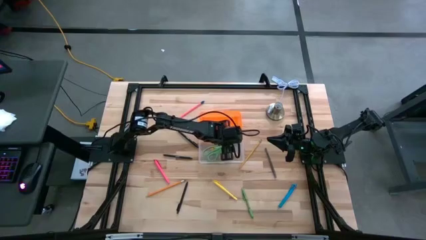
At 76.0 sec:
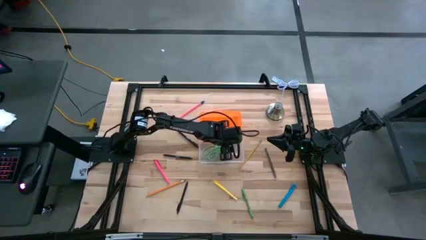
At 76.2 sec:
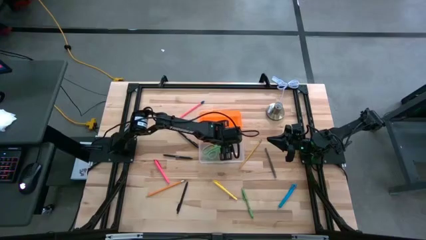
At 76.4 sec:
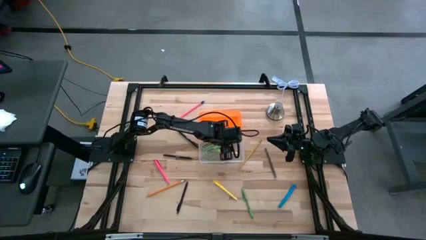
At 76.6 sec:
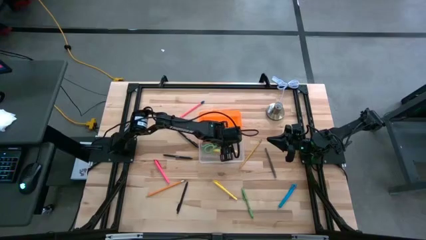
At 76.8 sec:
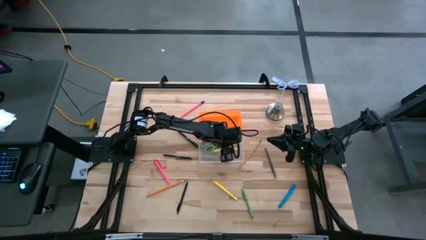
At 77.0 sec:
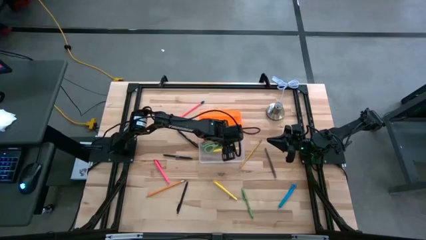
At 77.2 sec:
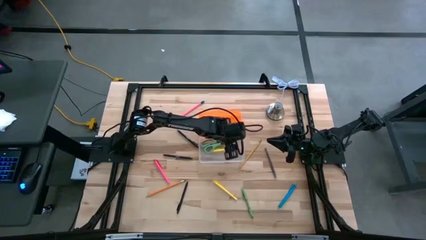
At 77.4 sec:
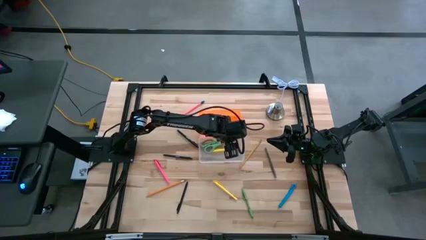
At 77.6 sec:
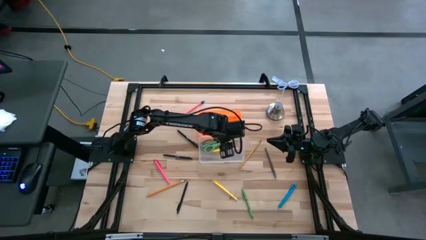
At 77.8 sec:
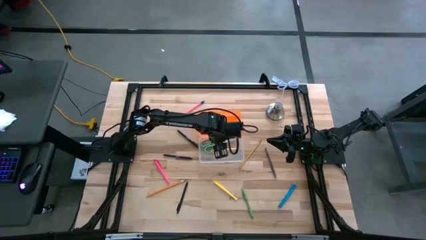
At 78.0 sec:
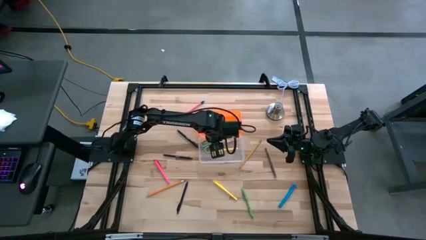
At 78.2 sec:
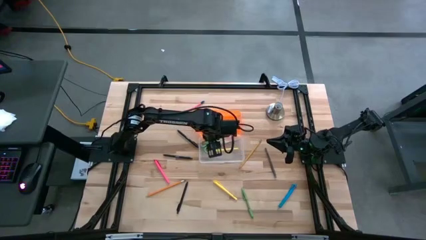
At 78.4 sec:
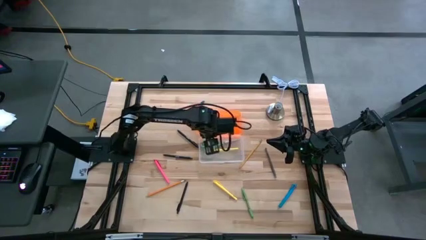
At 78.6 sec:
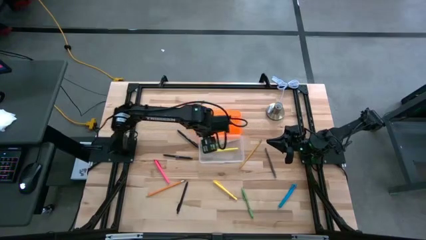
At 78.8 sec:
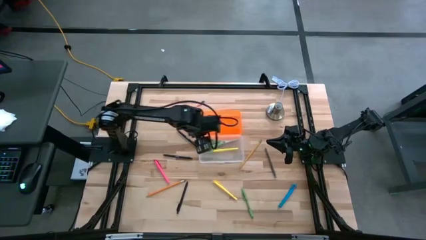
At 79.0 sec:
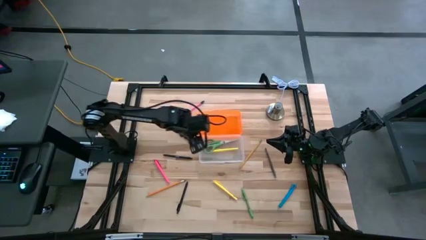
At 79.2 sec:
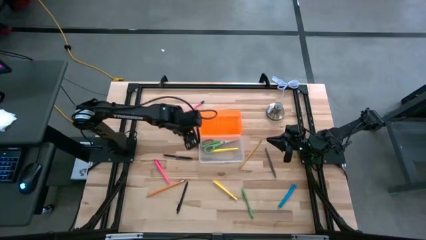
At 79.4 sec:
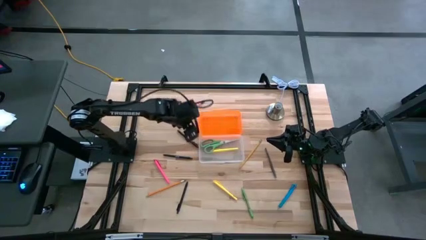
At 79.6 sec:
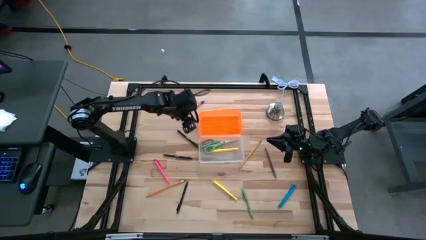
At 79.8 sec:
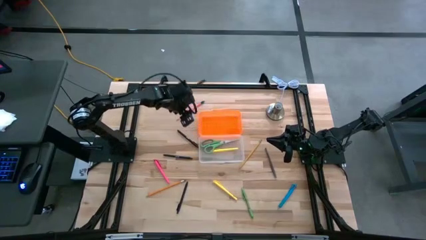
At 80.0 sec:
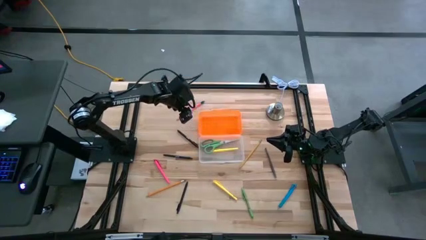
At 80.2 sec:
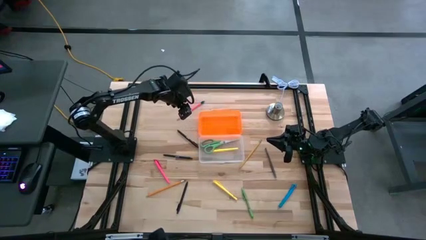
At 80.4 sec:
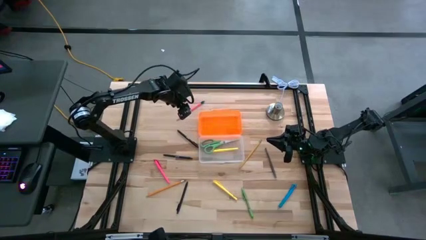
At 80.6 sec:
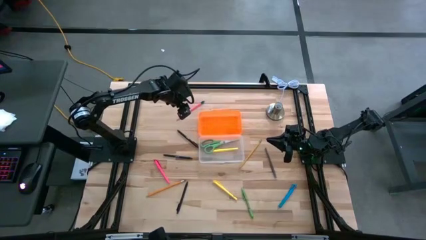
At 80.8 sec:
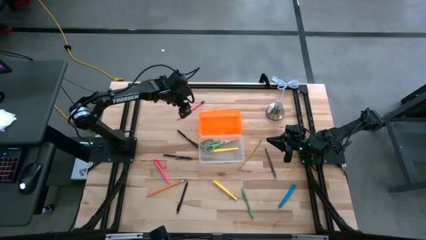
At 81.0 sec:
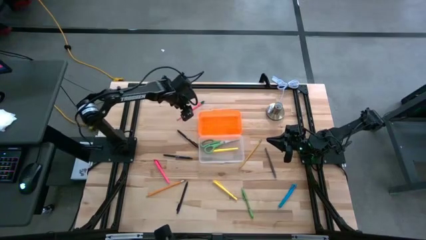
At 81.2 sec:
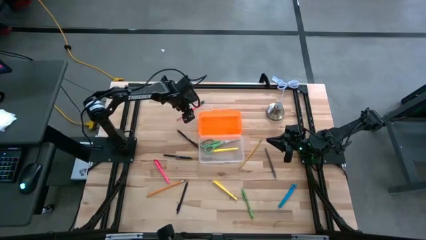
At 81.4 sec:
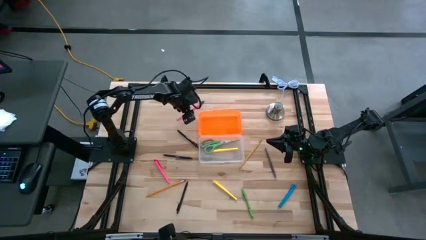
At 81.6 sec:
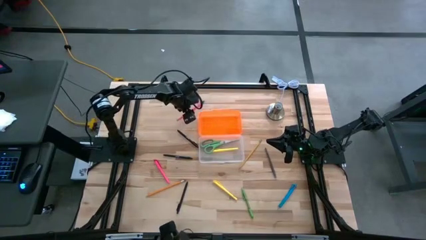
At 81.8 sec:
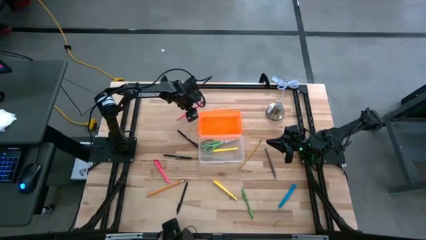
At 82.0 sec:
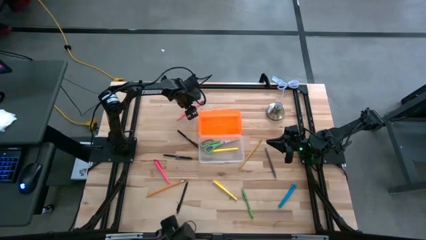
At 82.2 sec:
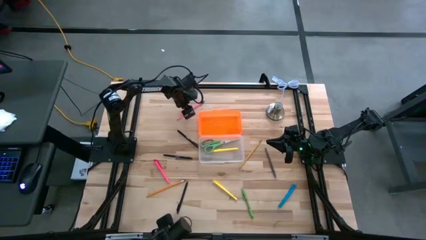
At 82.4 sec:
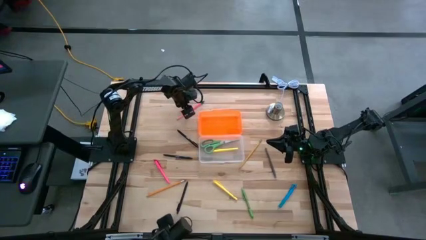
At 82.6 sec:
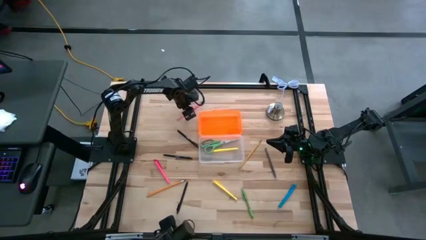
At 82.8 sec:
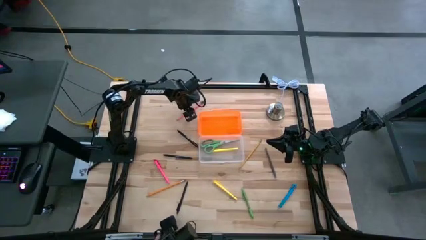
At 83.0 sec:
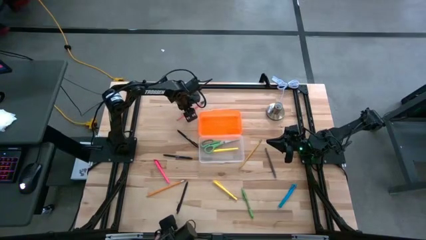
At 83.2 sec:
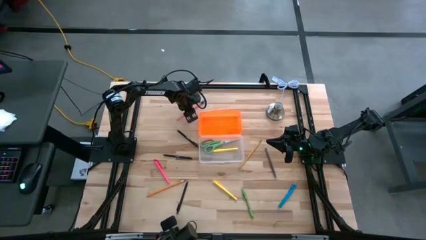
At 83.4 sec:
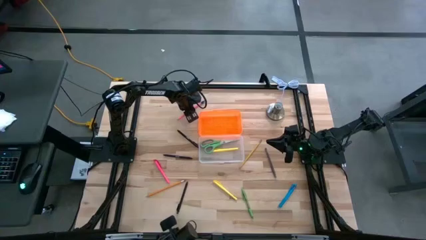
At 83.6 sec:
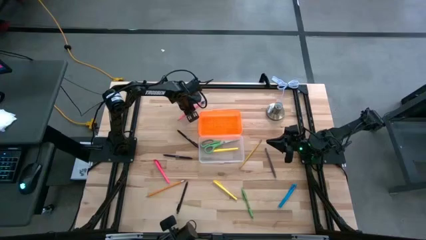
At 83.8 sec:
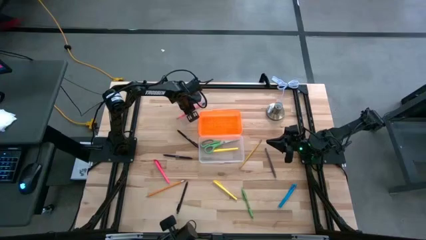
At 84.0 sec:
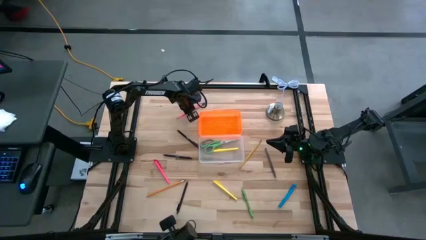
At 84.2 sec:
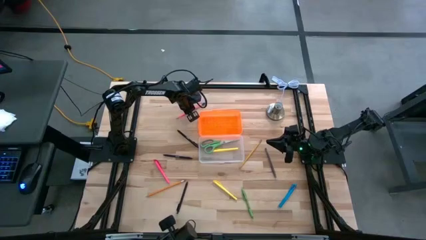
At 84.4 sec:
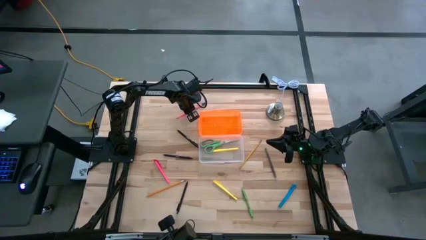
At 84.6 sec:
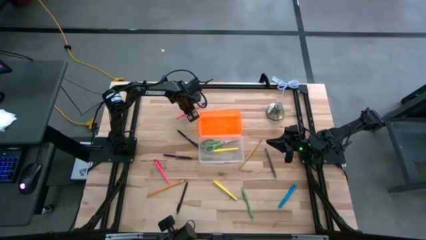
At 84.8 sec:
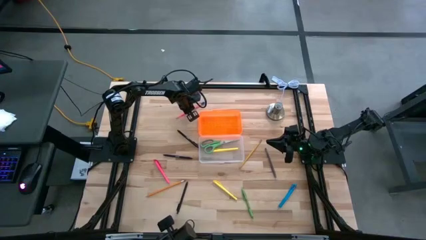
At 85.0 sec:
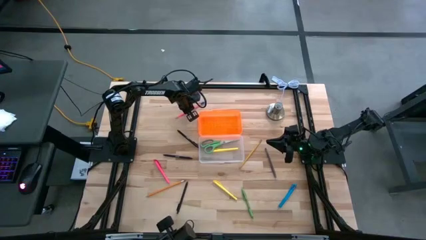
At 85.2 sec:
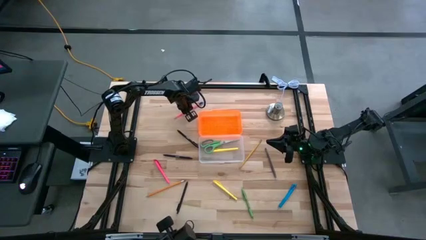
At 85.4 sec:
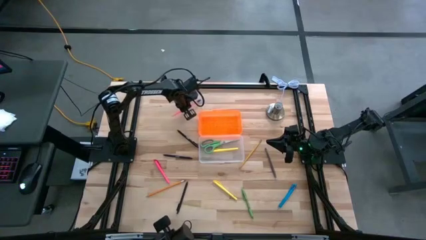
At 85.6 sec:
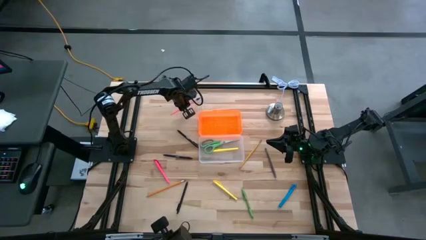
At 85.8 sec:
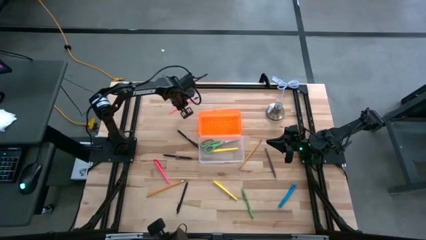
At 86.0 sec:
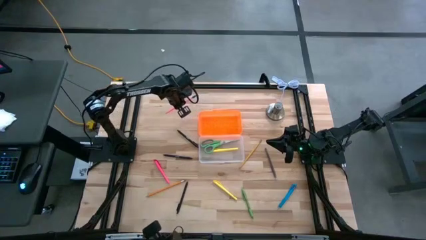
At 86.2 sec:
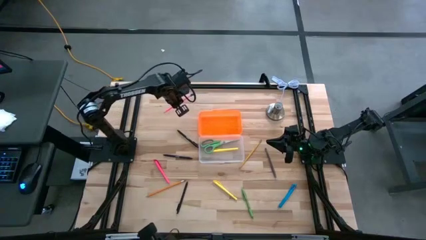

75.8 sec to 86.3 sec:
Task: Pick & place school supplies into a supply box
Put the pink pen into the container

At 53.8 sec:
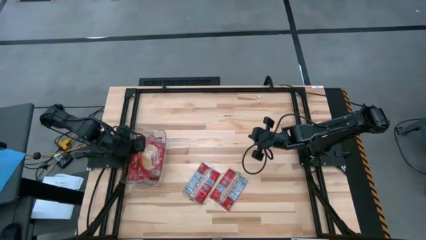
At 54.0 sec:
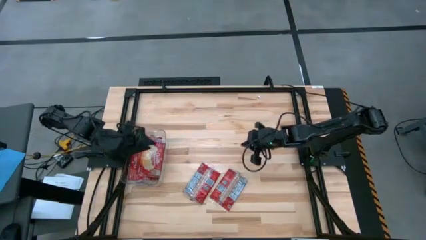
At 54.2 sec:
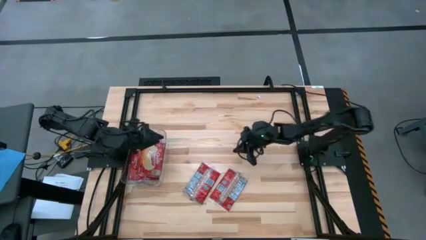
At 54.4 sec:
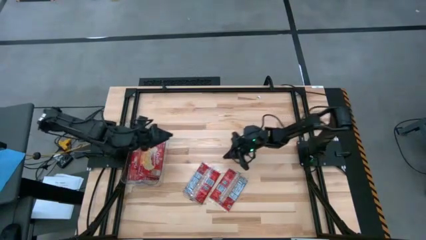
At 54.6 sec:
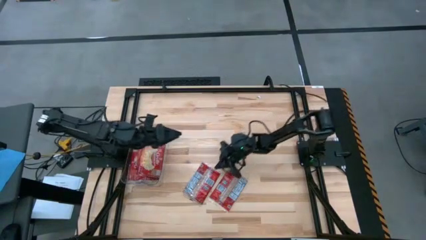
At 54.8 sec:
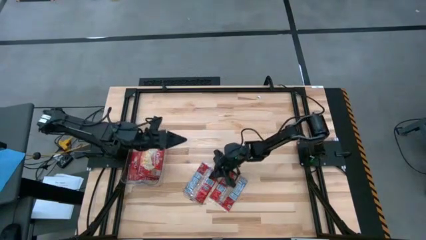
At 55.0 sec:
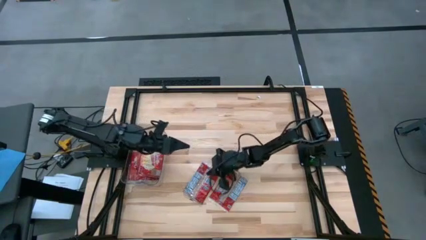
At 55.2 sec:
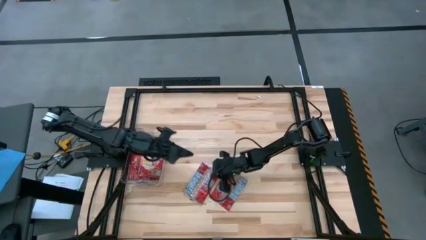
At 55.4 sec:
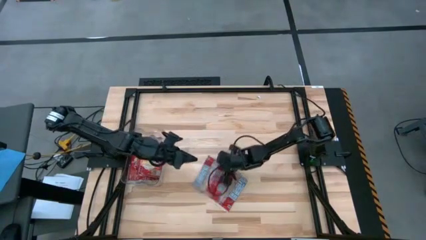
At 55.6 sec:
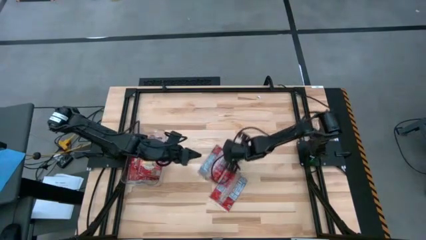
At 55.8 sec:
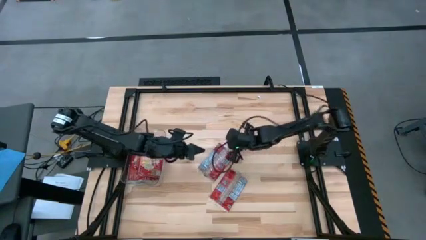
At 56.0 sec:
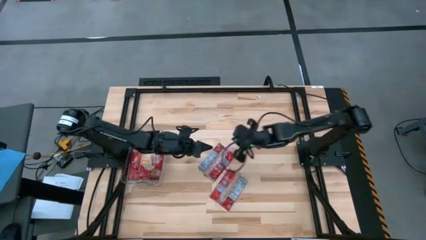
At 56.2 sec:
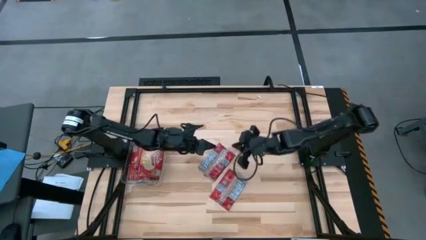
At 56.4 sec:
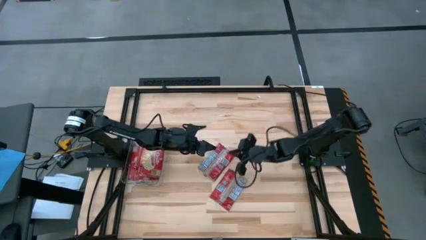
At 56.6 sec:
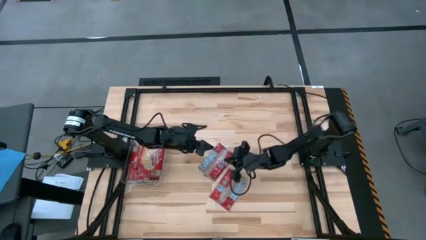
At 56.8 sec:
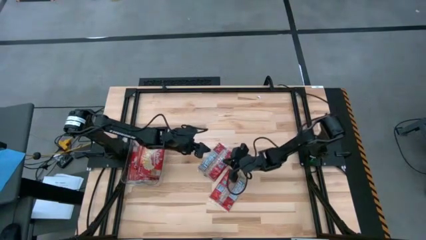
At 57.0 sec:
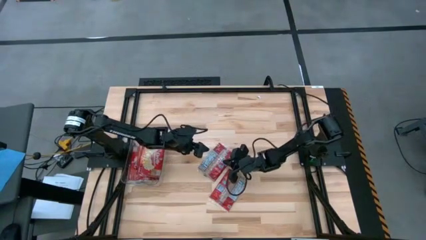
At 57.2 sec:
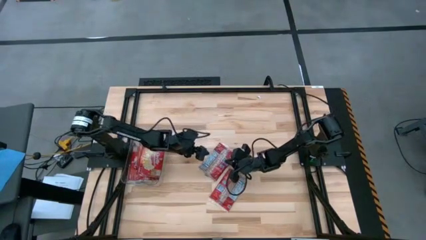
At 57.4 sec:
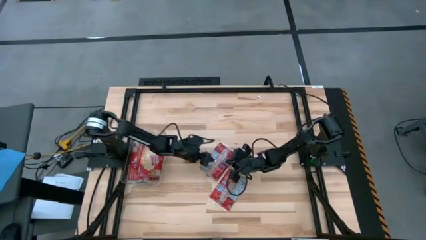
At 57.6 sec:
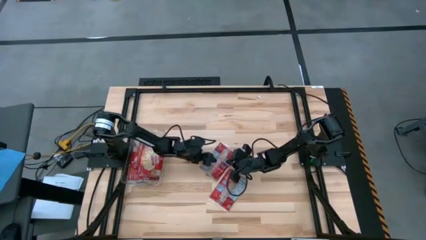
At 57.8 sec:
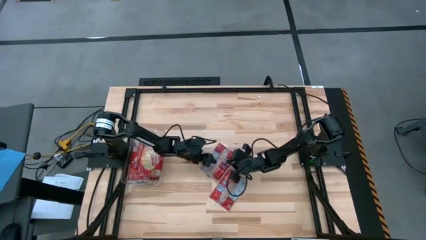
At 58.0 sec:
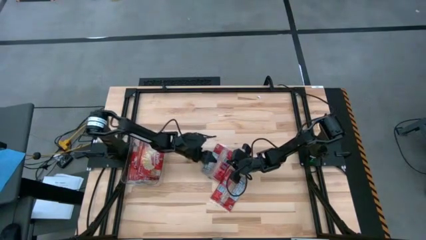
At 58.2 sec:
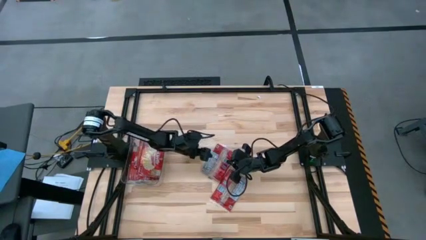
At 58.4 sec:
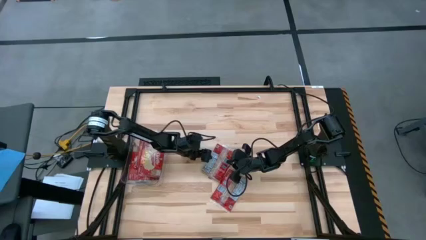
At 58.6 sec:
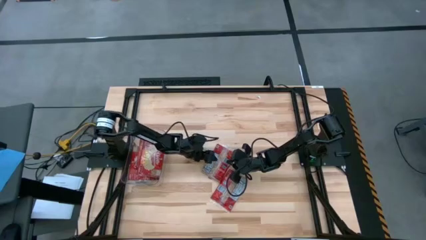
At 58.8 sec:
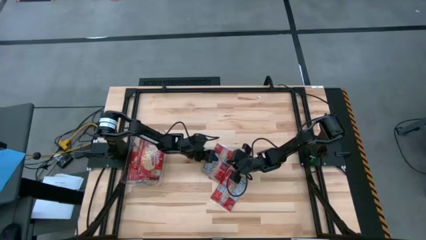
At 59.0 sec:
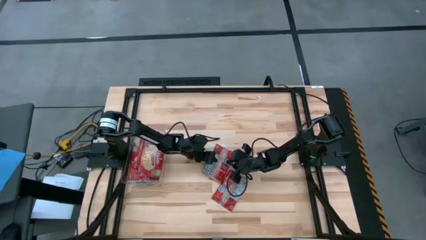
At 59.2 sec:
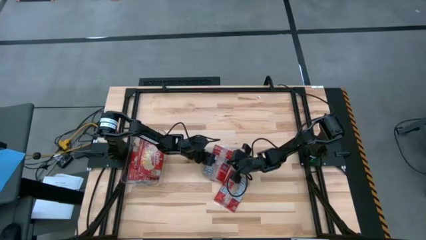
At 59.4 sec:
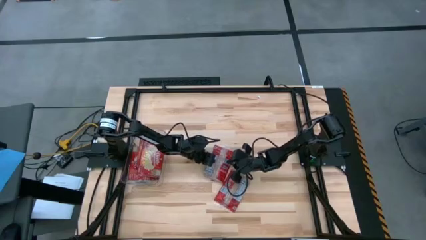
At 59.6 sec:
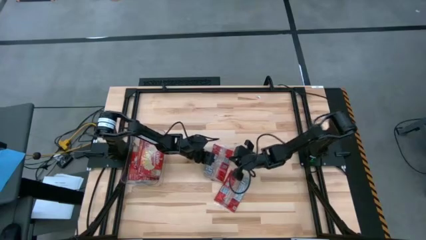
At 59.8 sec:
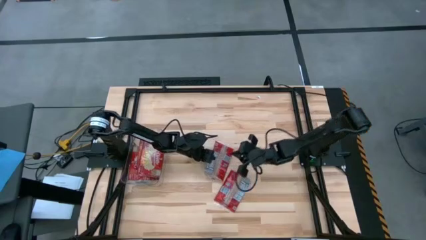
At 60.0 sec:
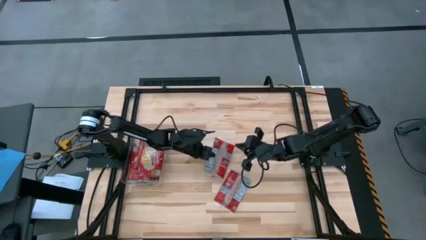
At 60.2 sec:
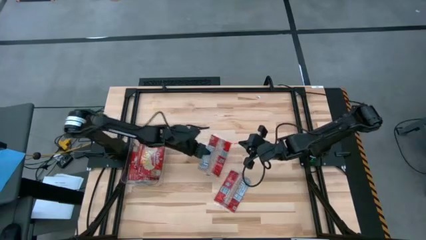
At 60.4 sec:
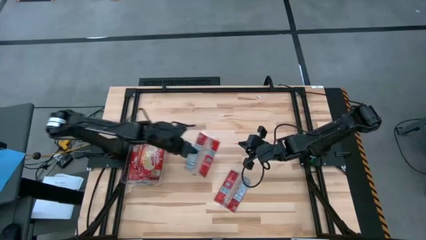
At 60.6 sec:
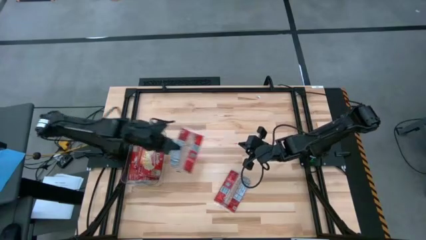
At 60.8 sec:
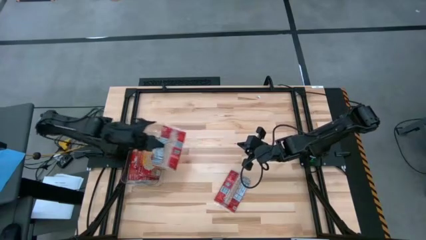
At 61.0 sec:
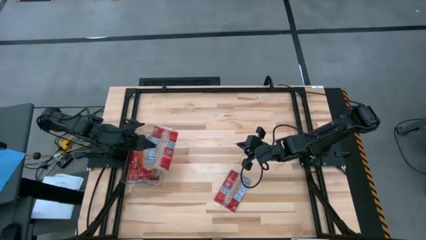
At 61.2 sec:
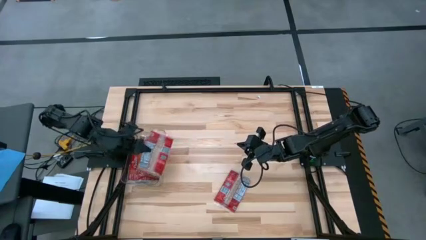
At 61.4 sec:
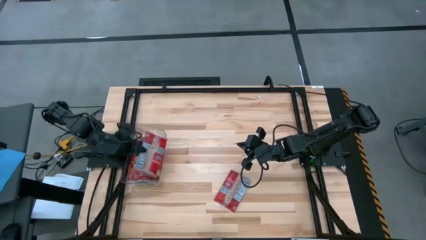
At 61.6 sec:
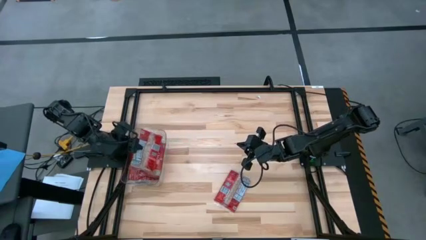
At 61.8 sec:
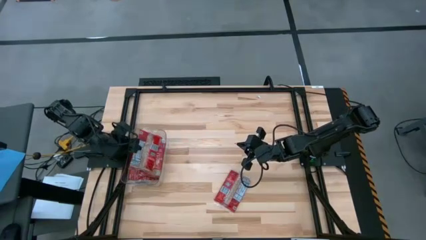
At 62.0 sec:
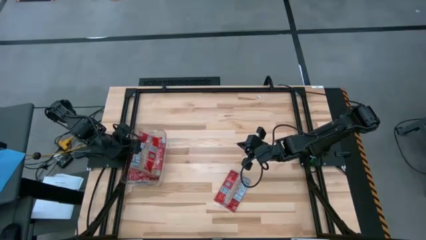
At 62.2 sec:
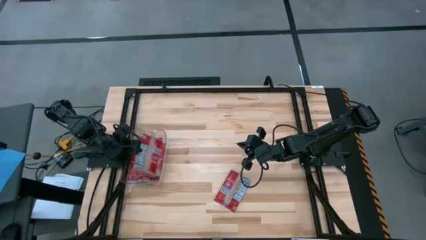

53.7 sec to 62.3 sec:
Task: Sort popcorn bags into baskets
Put the red popcorn bag into the transparent bin
